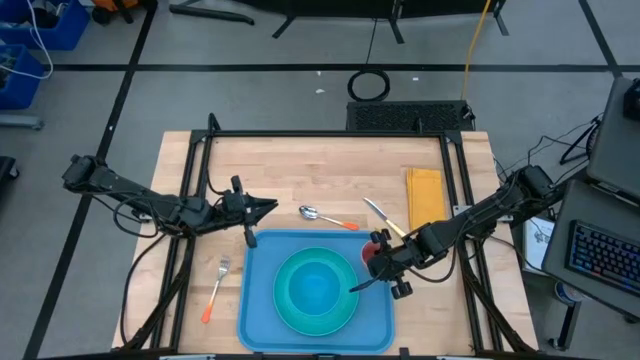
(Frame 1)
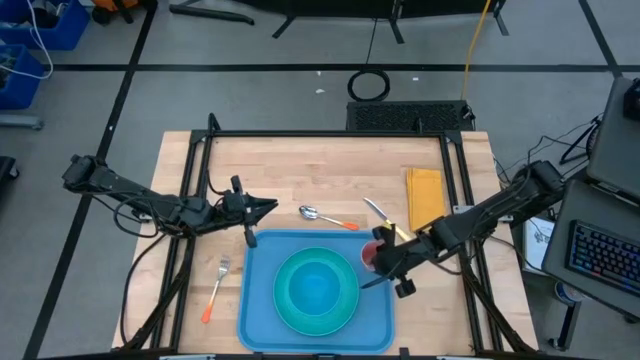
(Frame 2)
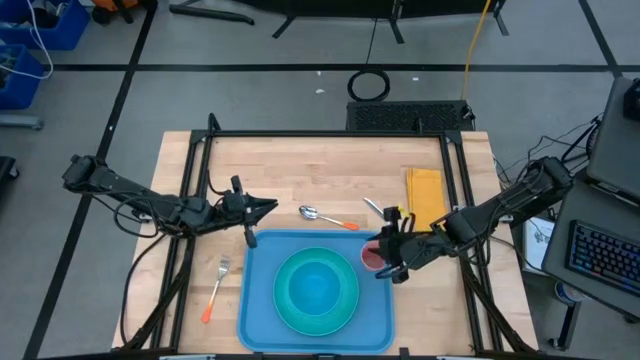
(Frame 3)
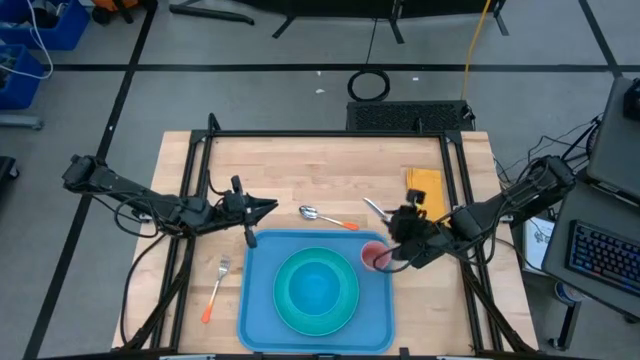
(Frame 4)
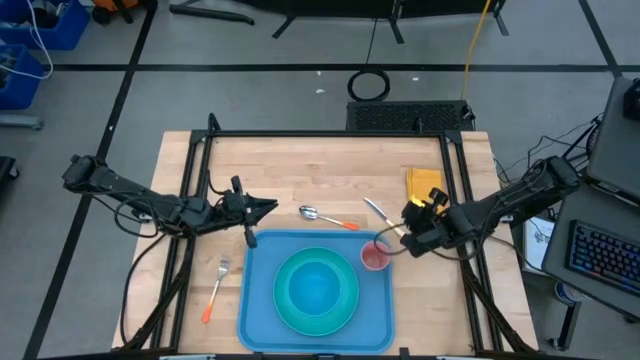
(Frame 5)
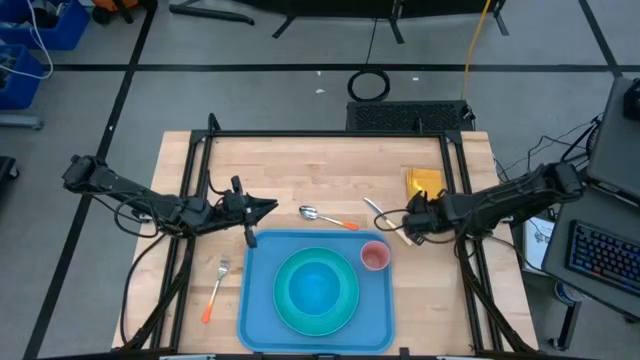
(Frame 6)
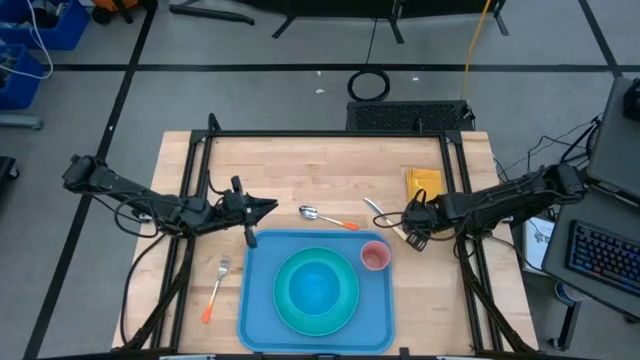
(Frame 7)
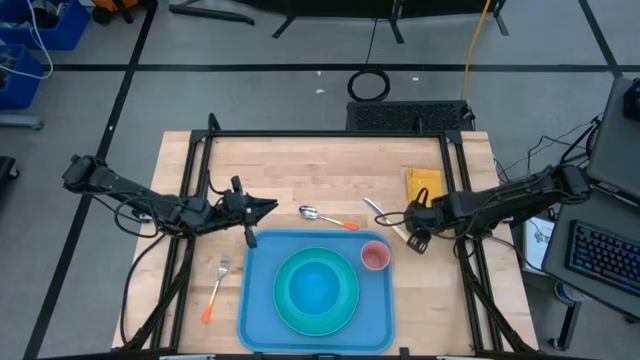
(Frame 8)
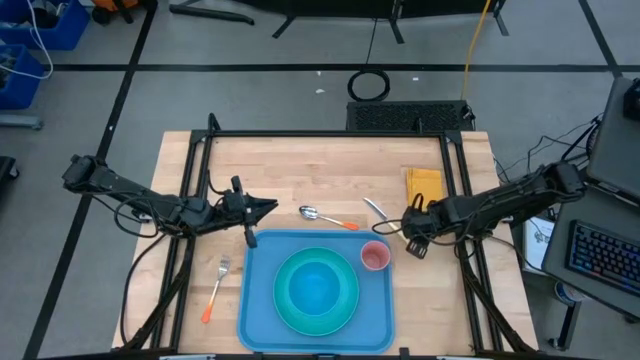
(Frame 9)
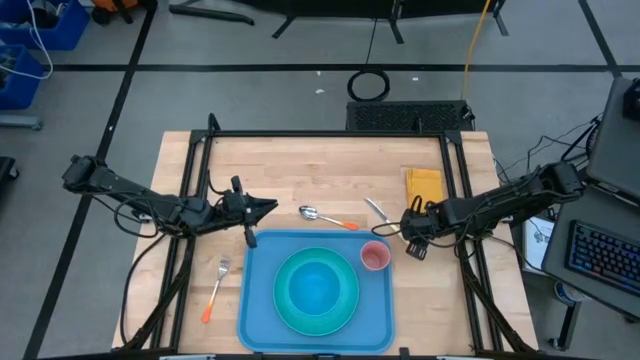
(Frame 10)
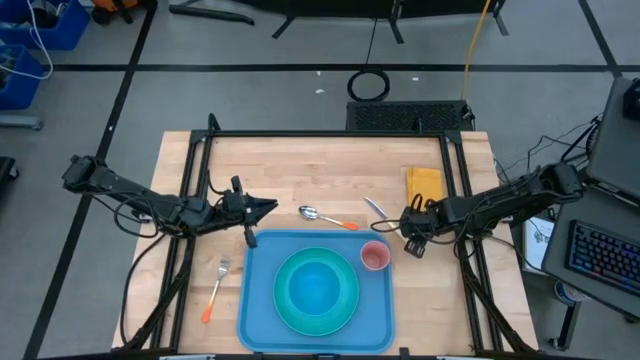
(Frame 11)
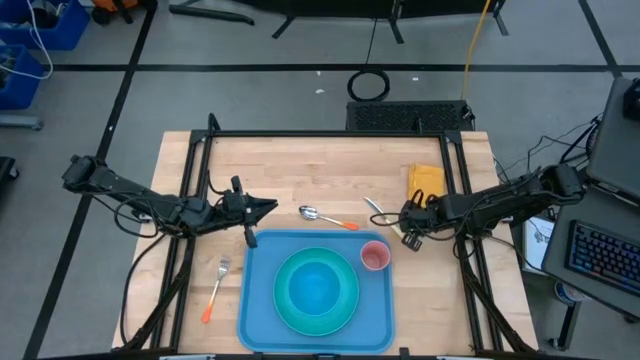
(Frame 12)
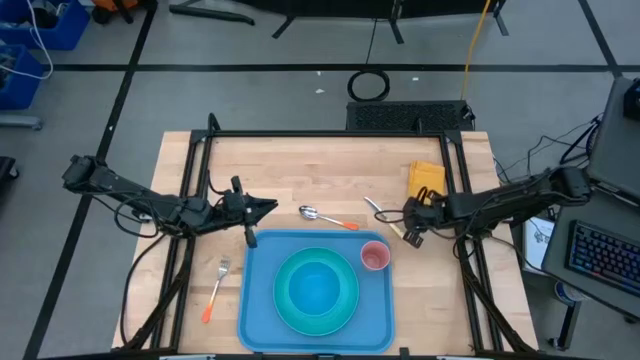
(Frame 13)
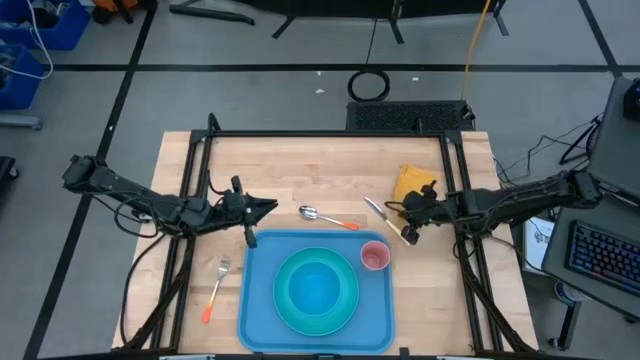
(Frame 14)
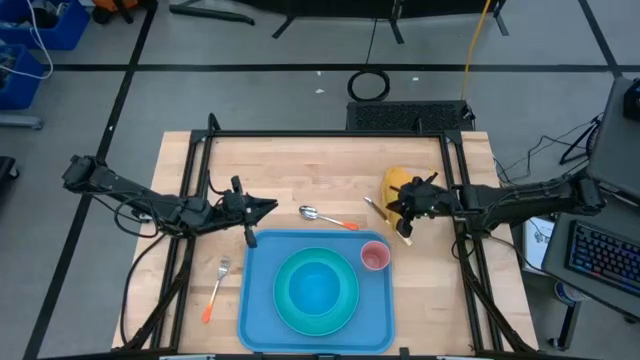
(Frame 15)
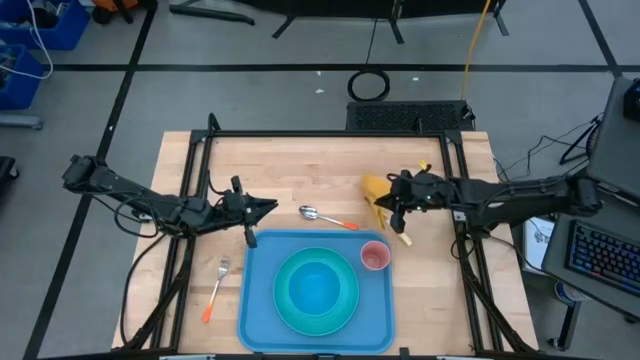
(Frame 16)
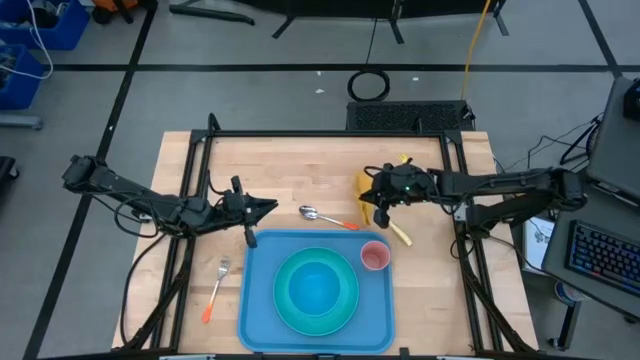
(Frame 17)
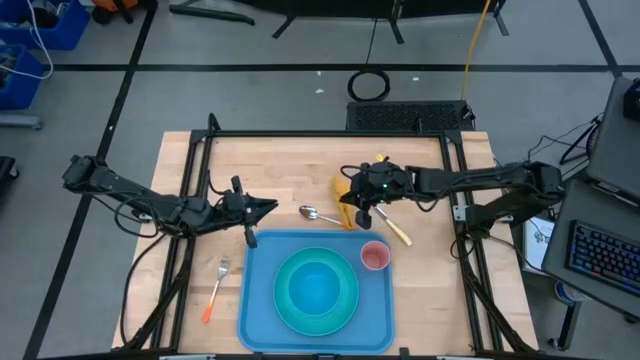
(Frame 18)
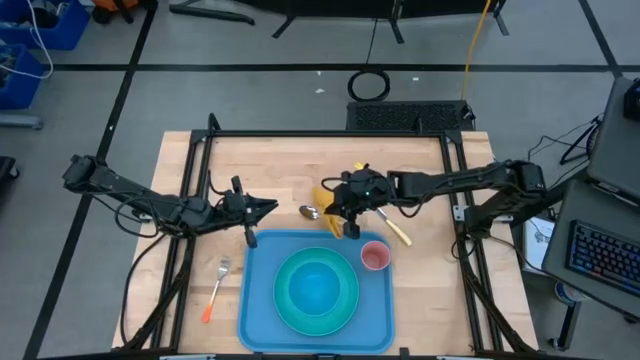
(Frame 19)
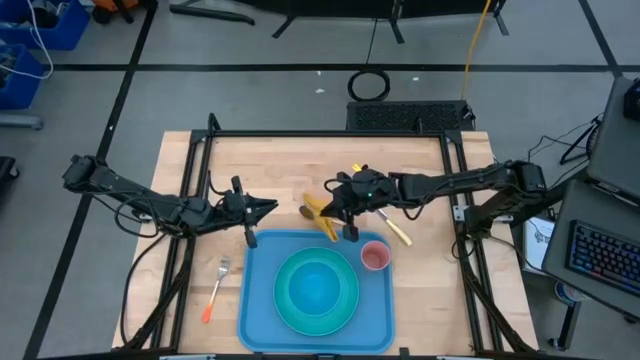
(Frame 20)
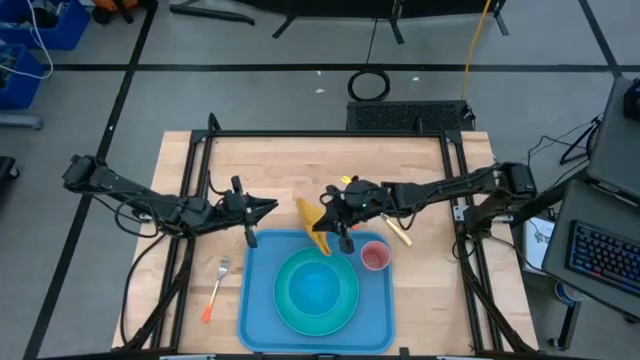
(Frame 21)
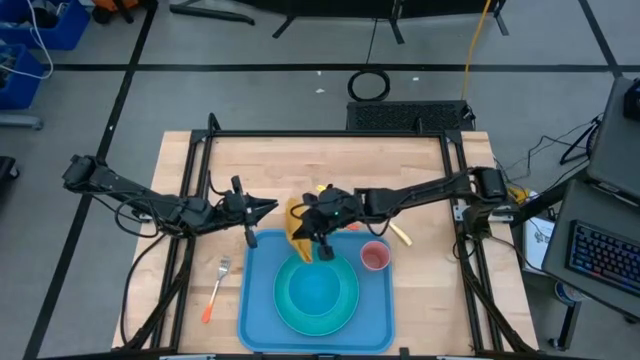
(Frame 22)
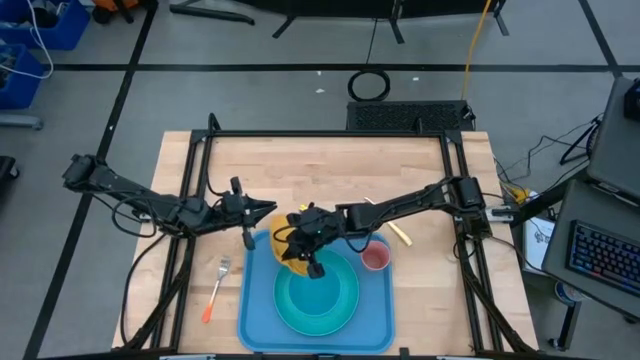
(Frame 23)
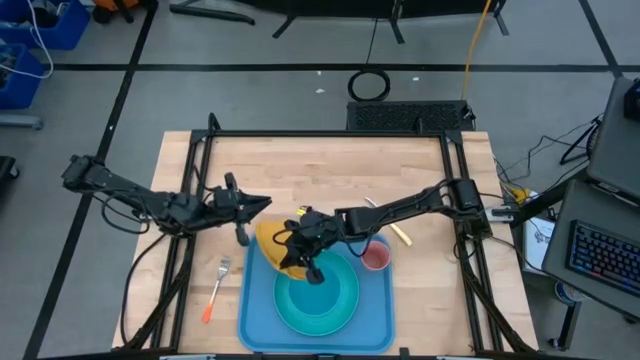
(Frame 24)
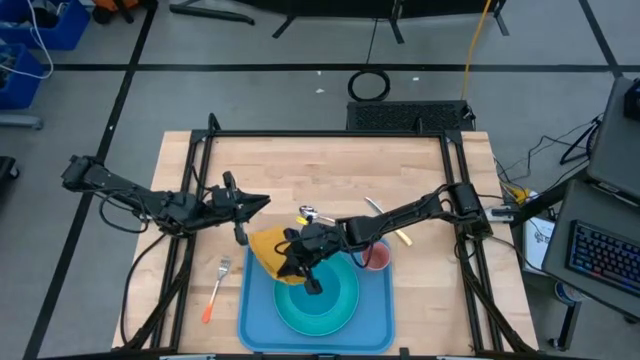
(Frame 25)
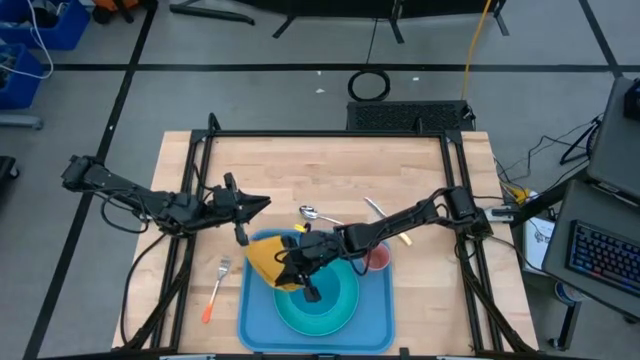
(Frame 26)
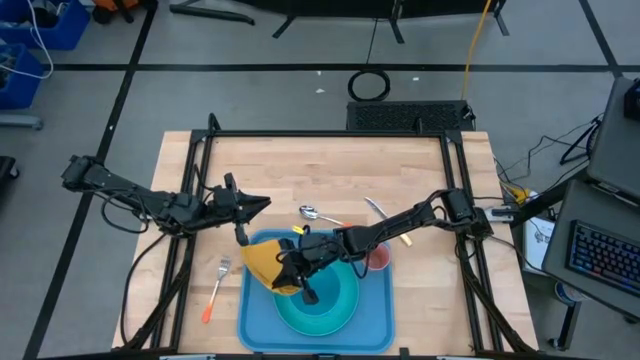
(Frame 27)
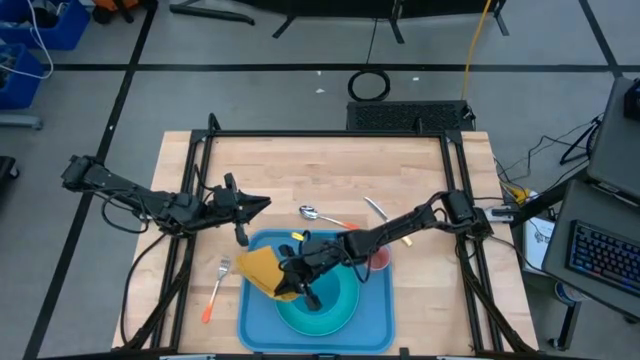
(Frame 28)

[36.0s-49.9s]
Task: Set up tray
Put the yellow table napkin on the blue tray to the left of the green plate

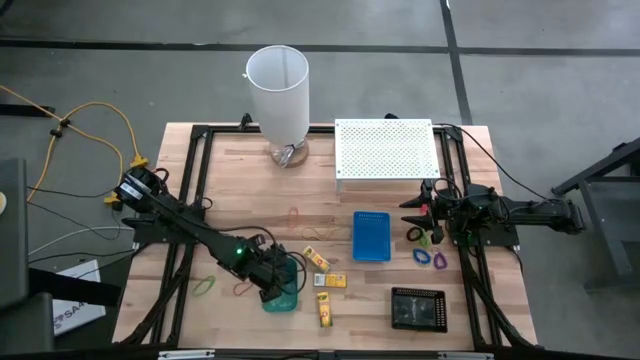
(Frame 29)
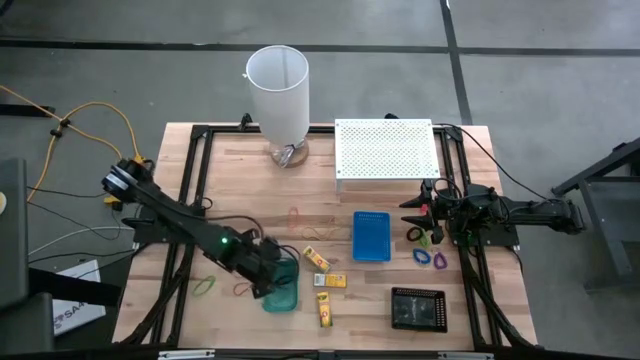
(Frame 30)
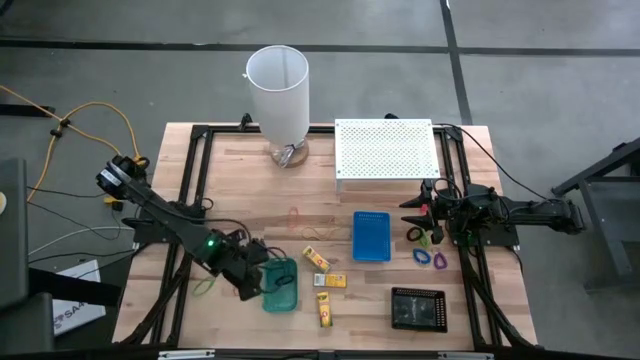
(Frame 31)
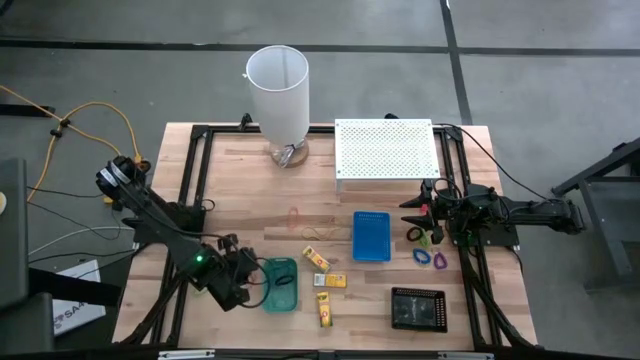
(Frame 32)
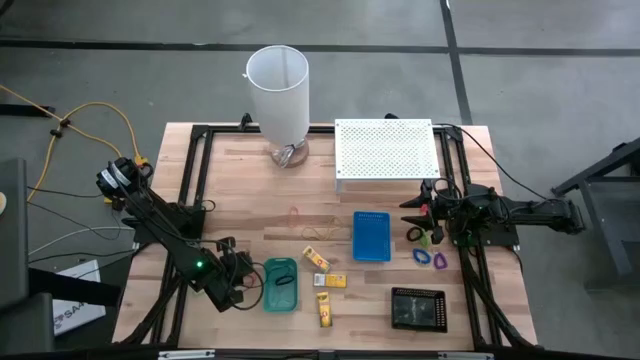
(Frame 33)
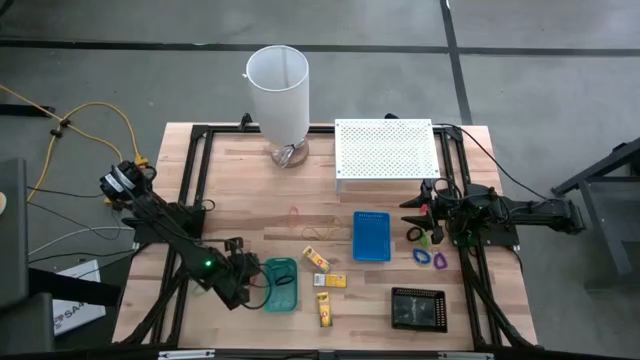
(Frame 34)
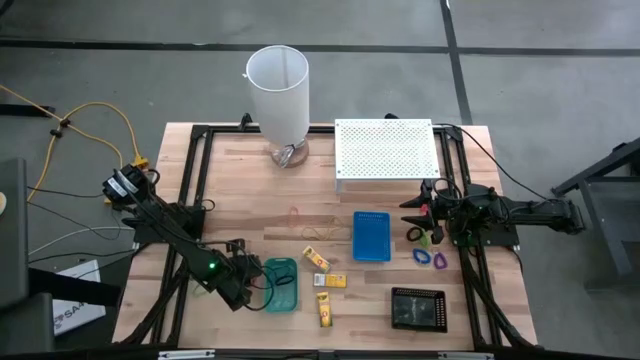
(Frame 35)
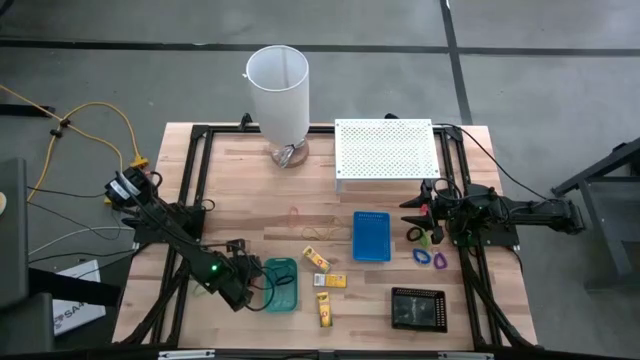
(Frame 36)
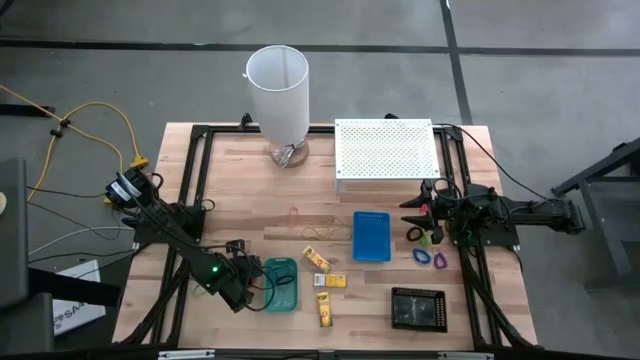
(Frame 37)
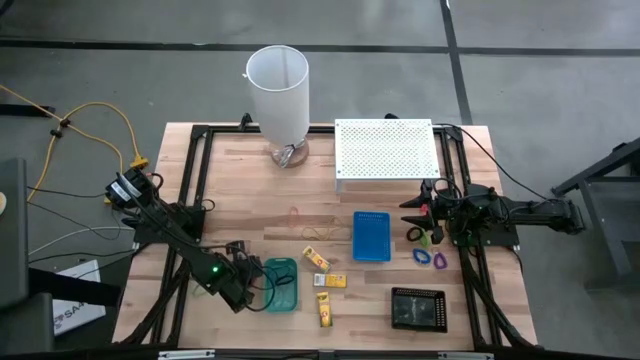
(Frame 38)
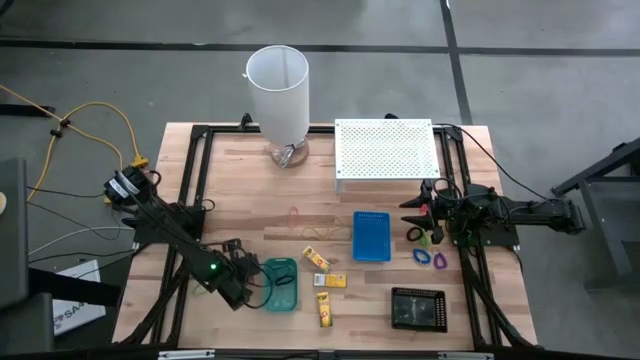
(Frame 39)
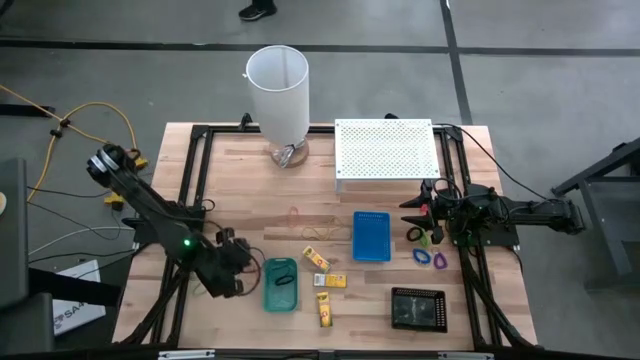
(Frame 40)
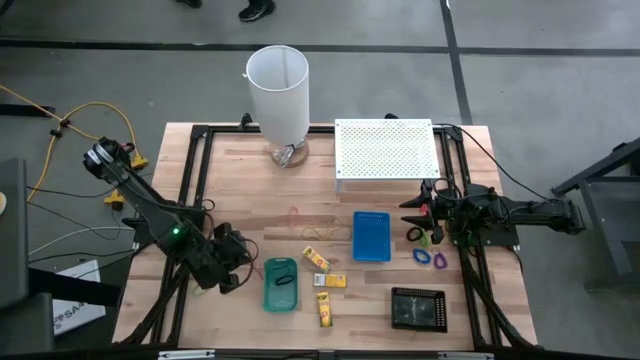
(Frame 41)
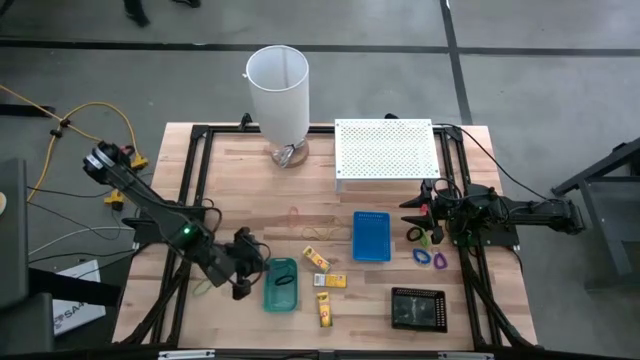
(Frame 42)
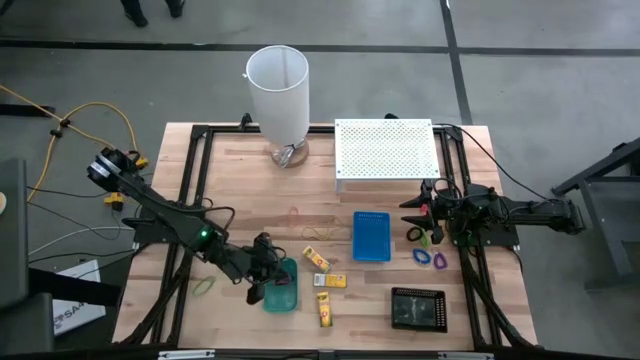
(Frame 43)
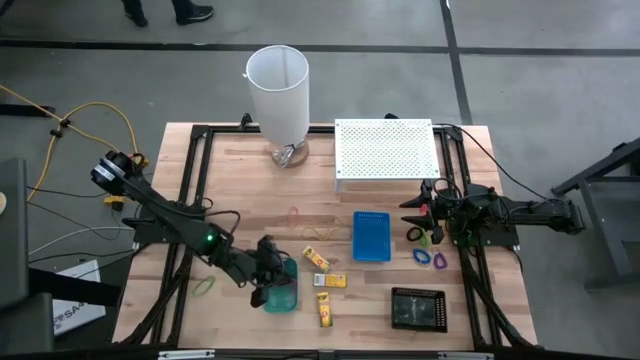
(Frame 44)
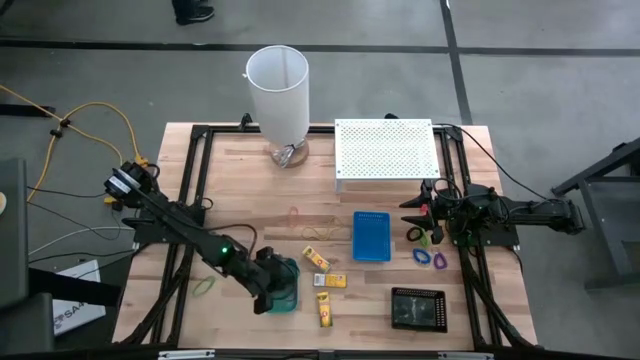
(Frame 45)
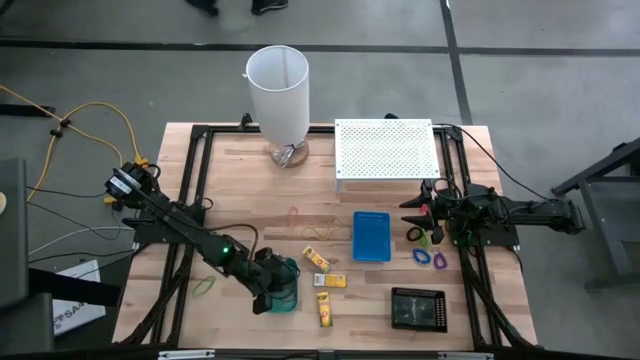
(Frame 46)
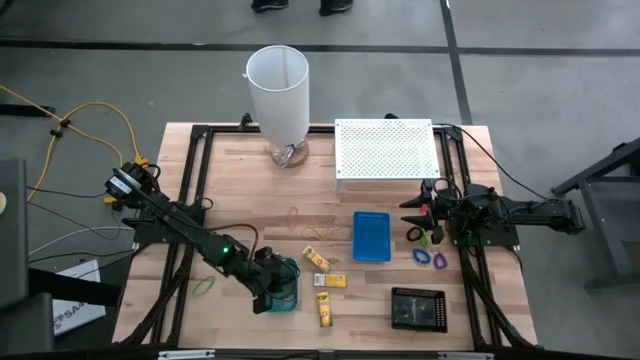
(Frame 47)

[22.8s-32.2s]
Task: Pick & Place Office Desk Supplies
Put the red rubber band into the green bin
